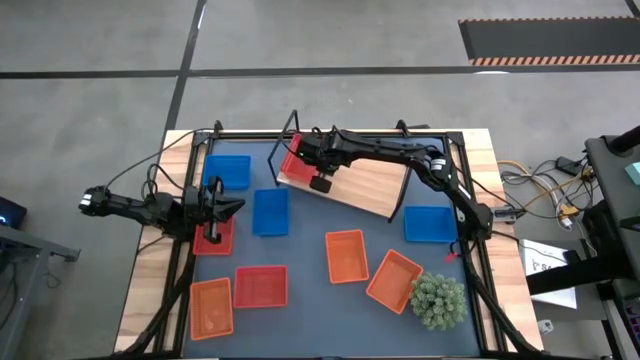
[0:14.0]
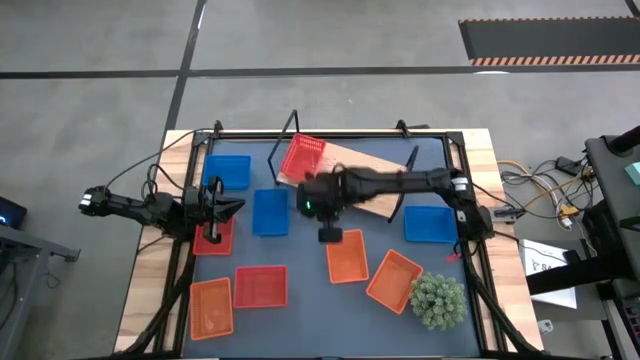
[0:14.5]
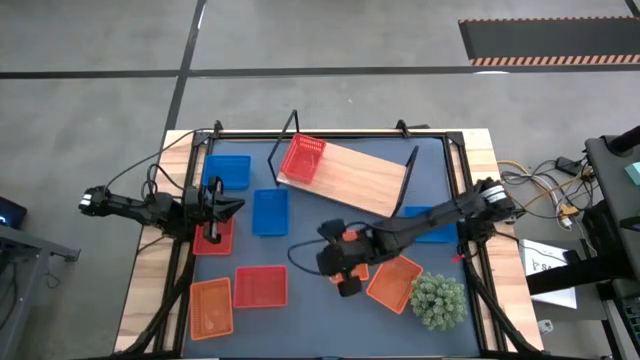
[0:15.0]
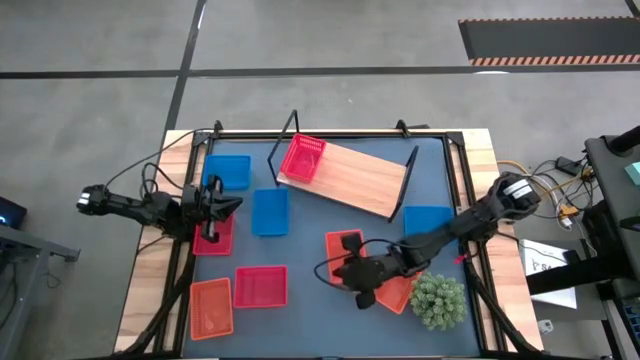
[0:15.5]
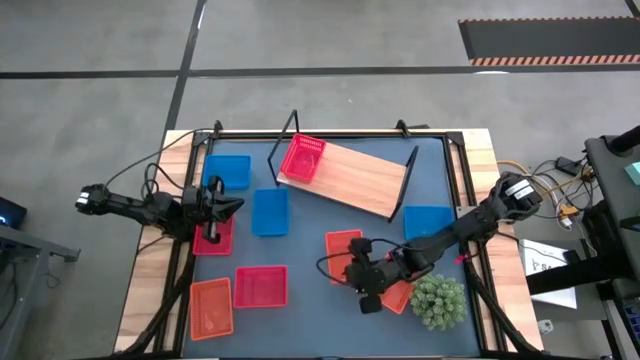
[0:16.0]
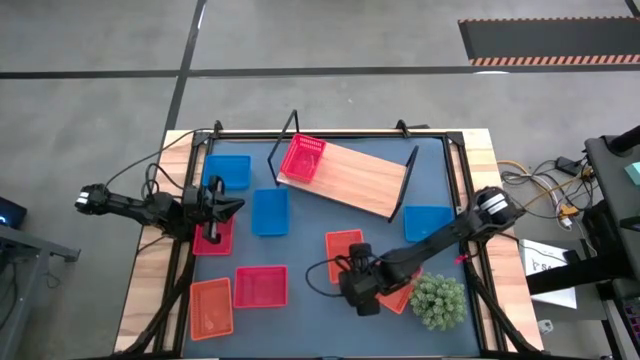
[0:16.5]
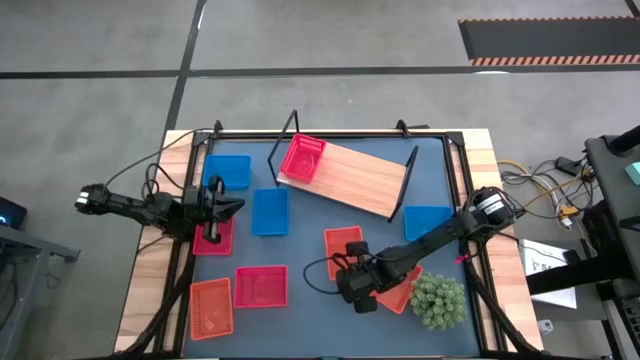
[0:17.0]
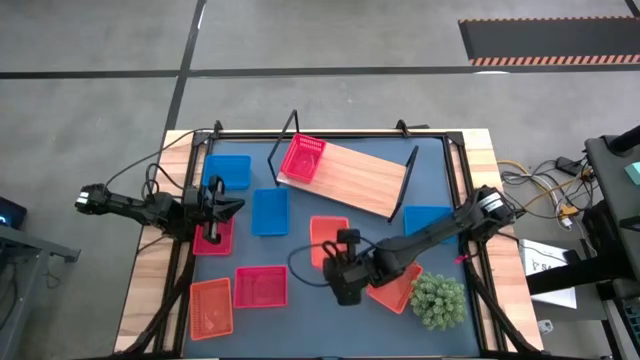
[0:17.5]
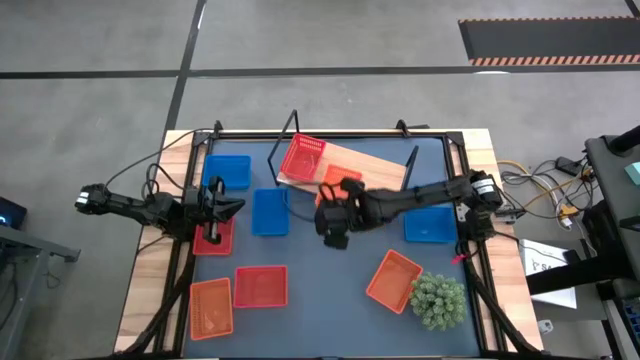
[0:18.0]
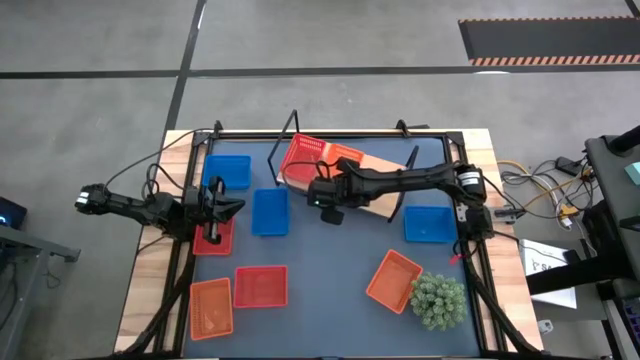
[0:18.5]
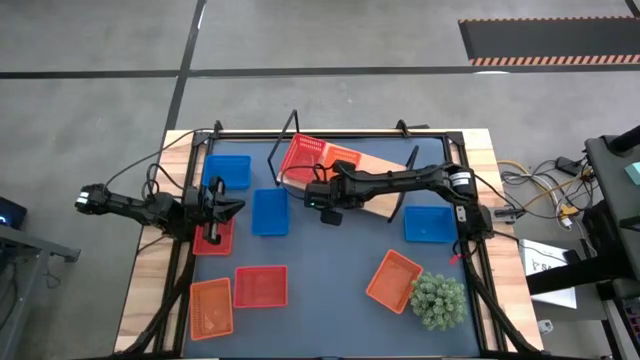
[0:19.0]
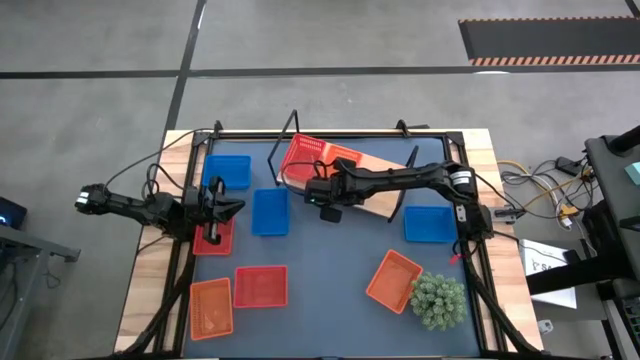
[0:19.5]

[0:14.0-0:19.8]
Task: Stack baskets on shelf by color
Put the middle orange bin on the shelf

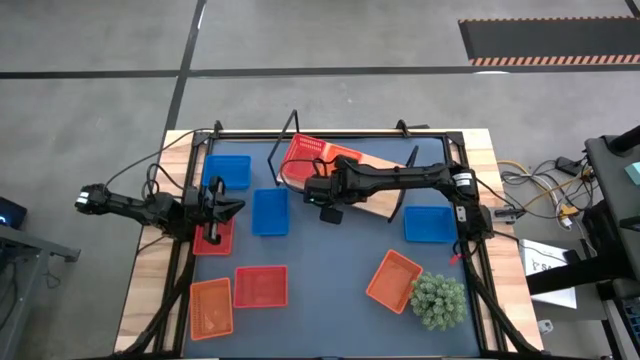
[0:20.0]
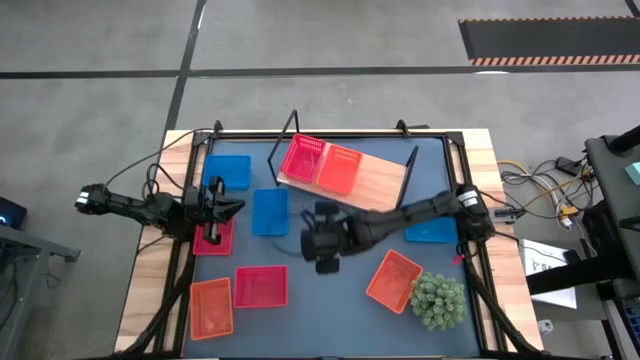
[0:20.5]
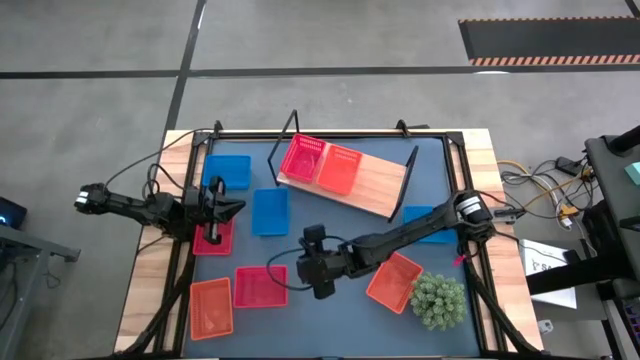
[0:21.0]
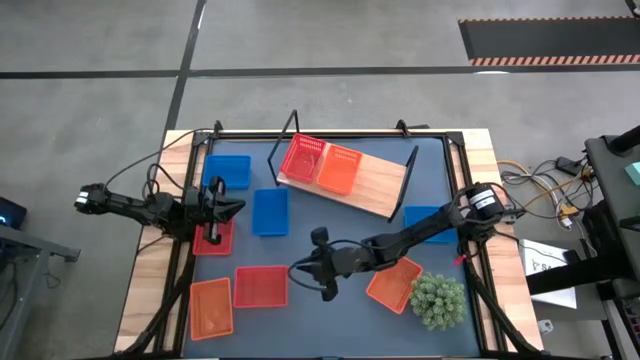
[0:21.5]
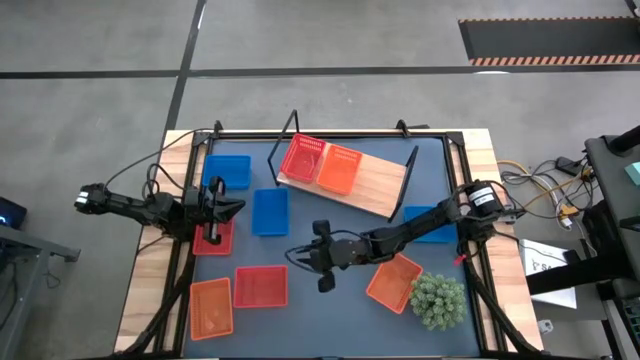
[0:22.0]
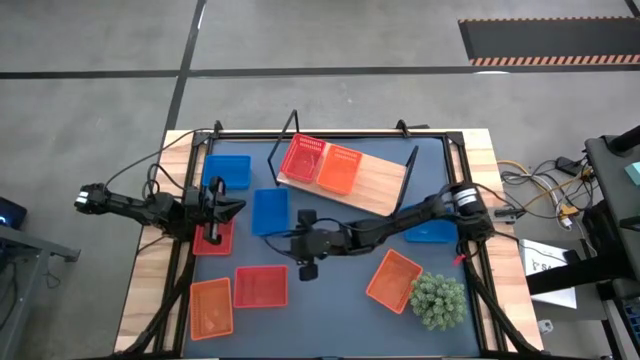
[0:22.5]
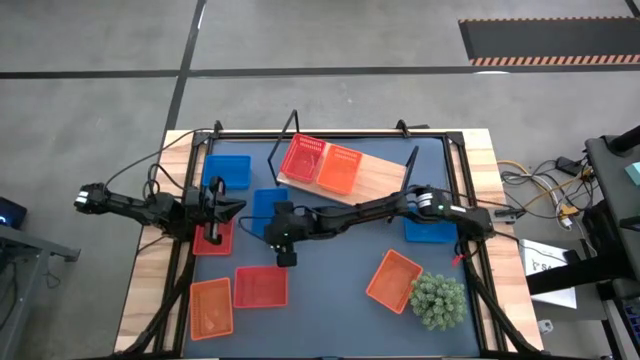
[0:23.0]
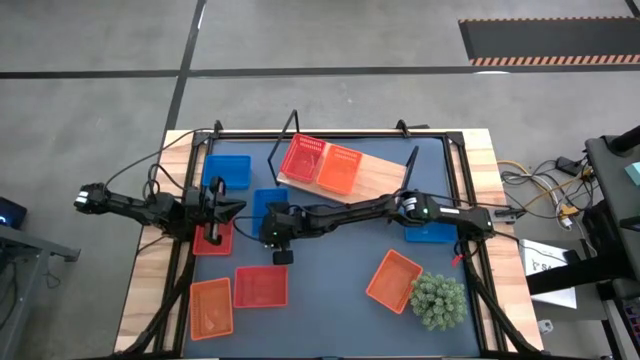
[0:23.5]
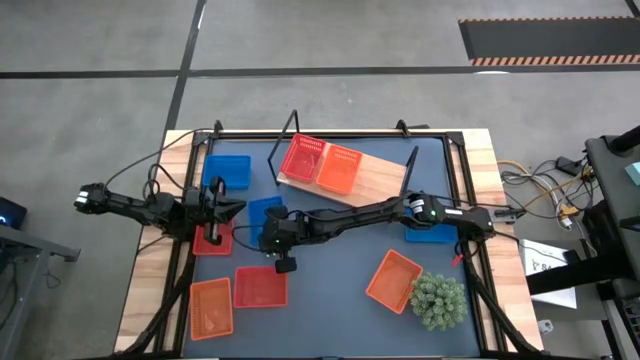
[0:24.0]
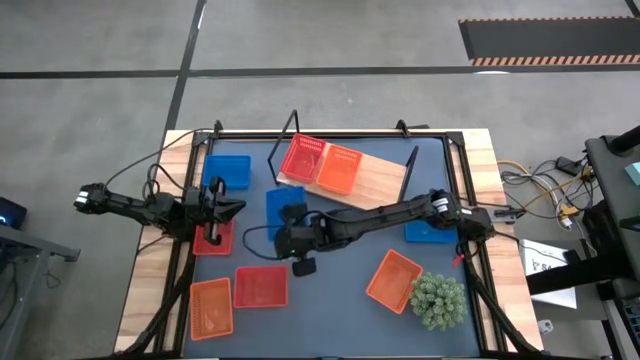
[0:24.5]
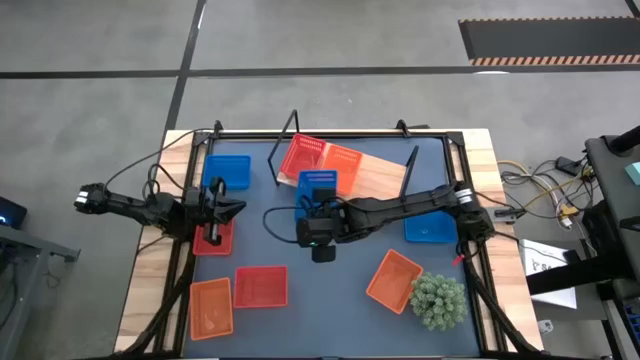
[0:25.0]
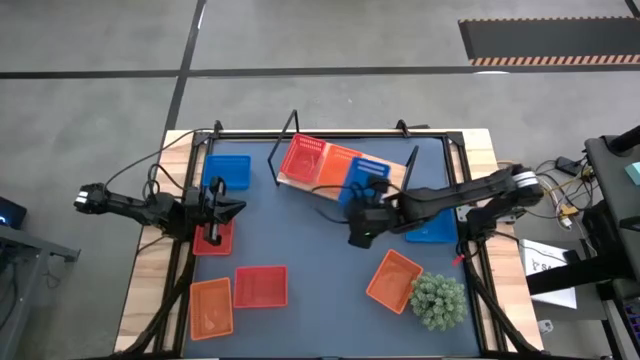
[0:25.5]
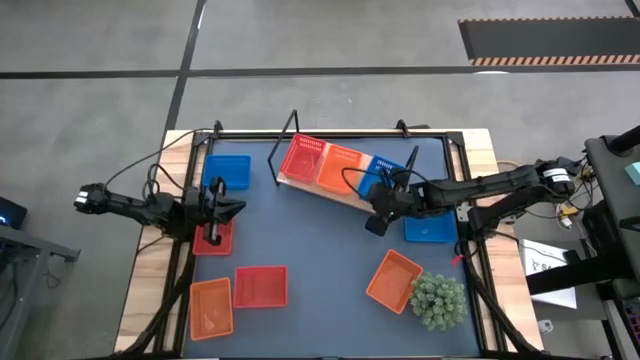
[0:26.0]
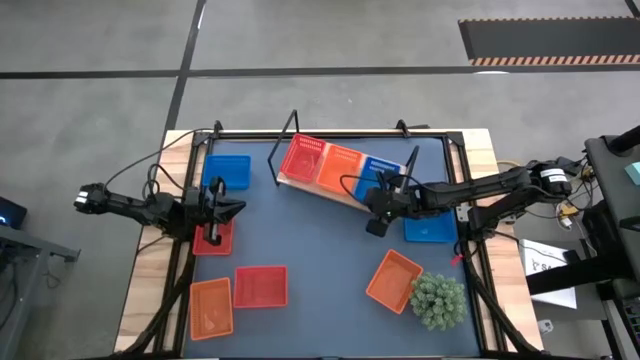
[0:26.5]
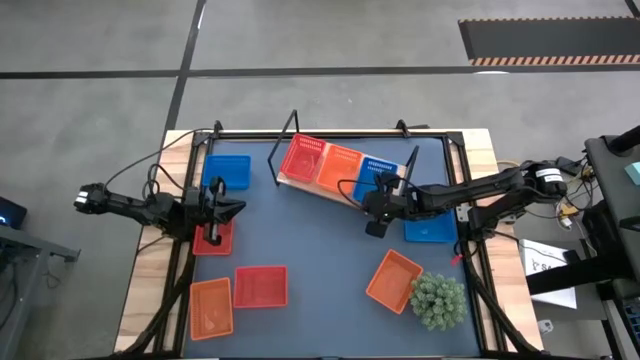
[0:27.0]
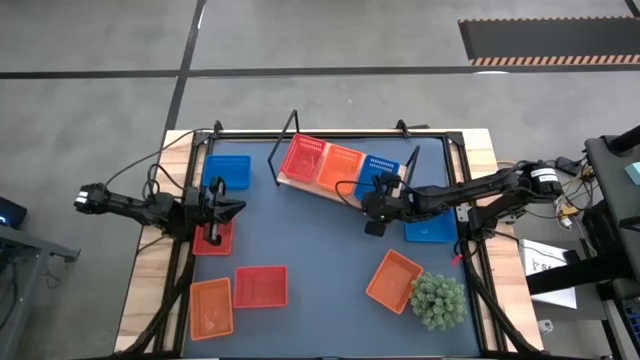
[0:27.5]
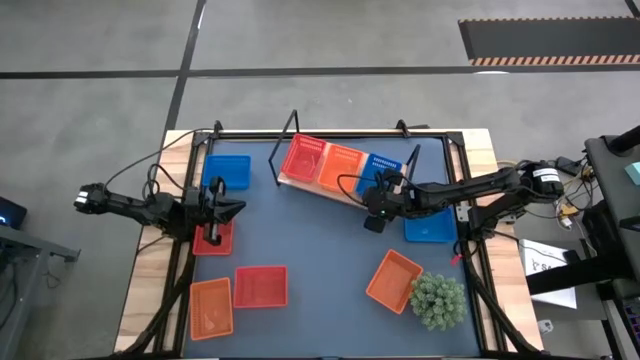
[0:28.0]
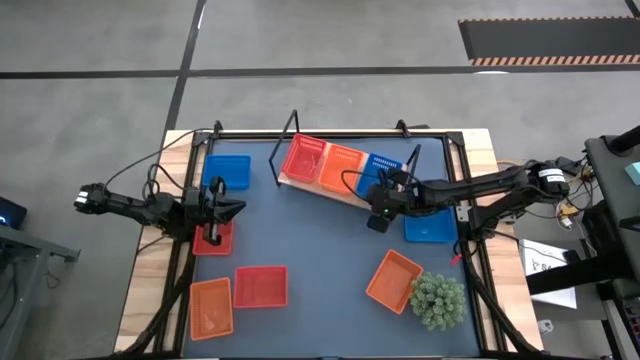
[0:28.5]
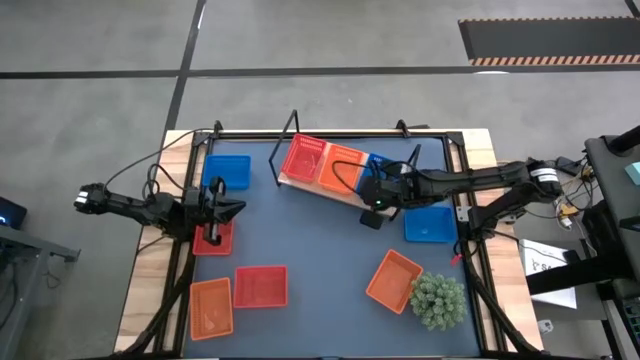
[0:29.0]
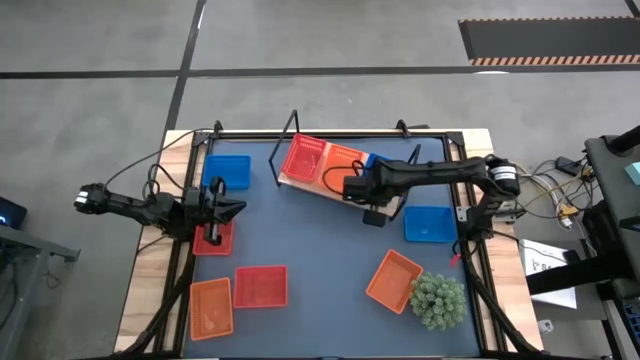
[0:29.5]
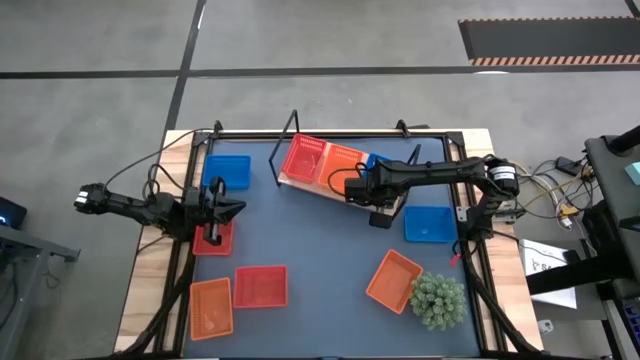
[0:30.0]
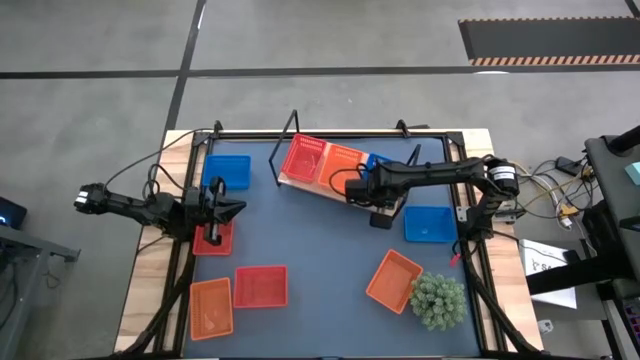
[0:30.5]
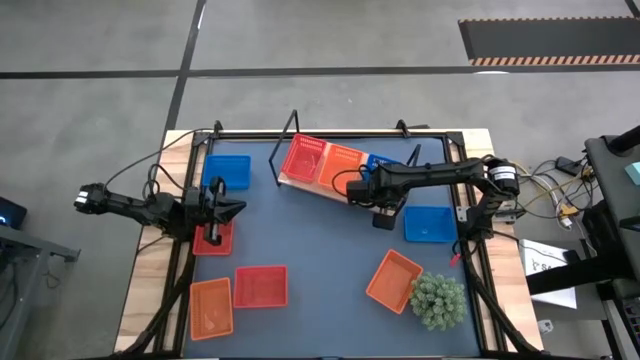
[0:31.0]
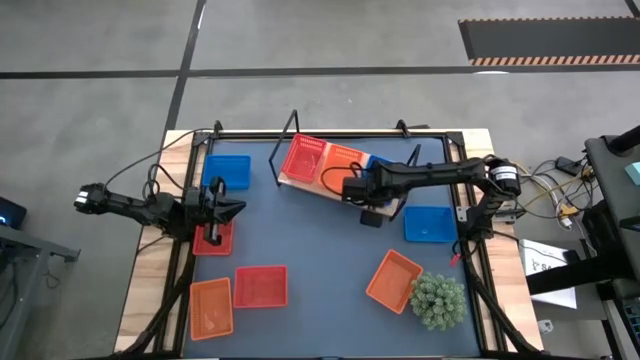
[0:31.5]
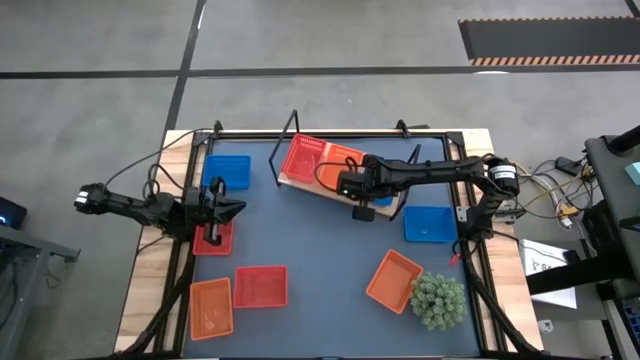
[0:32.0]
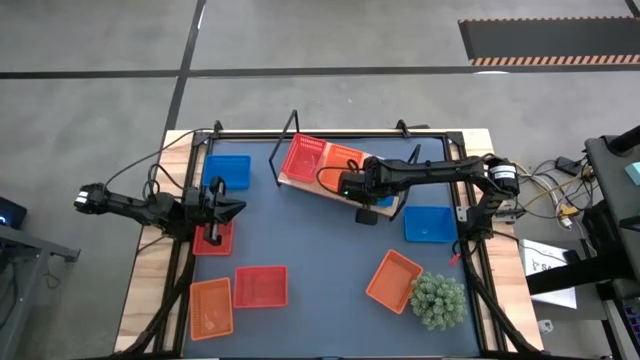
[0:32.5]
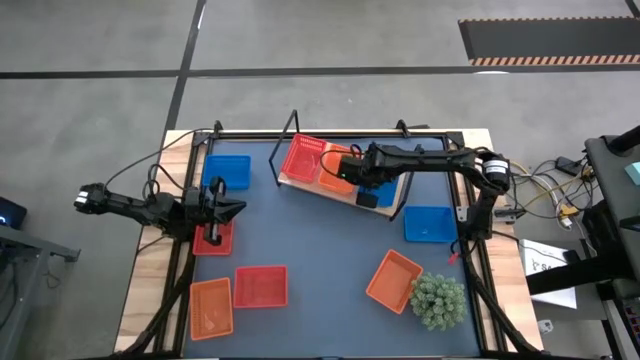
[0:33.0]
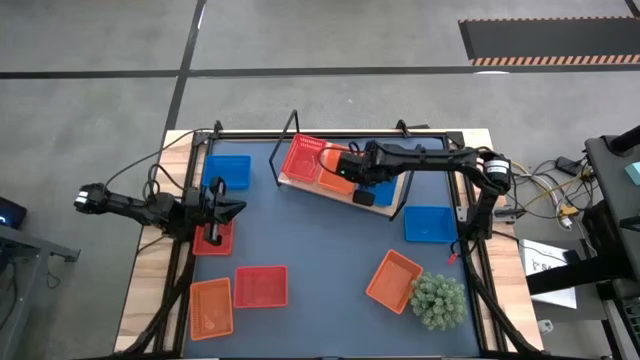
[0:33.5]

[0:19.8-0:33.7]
Put the middle blue bin on the shelf

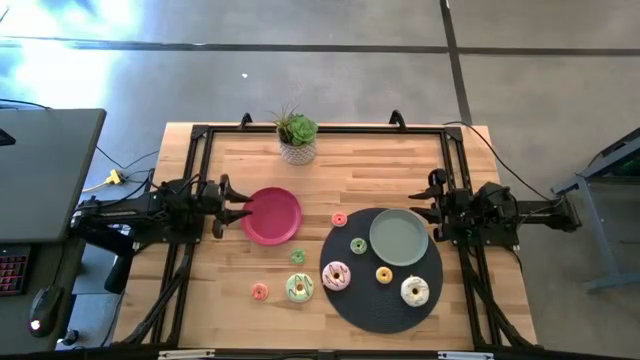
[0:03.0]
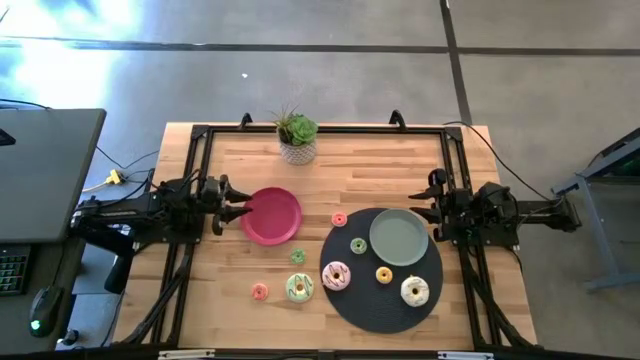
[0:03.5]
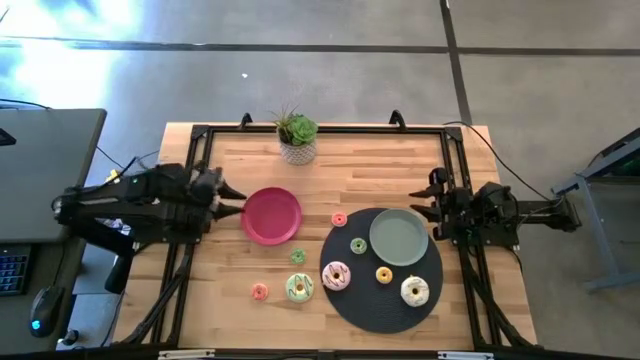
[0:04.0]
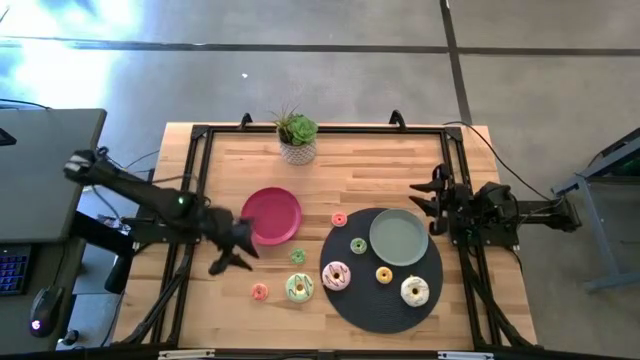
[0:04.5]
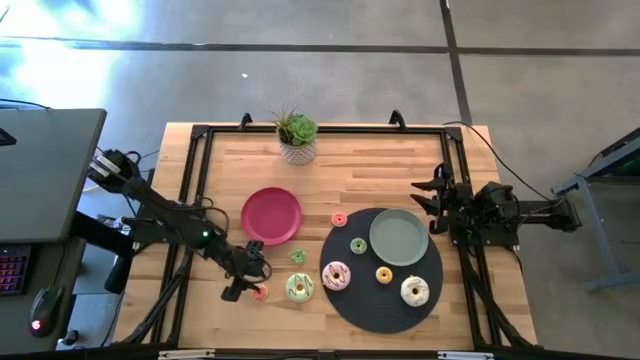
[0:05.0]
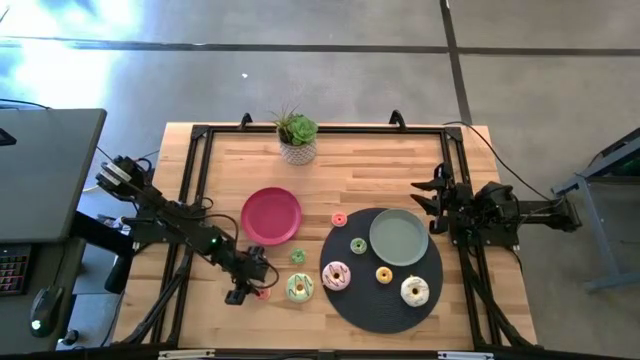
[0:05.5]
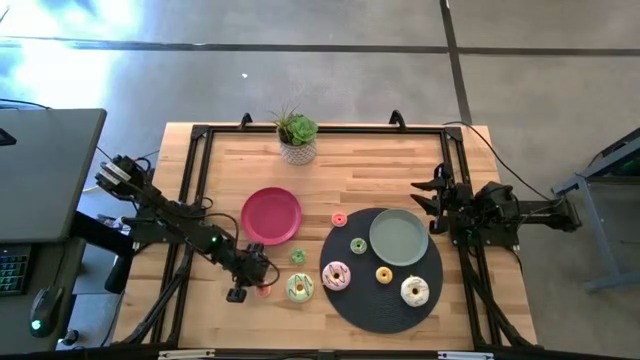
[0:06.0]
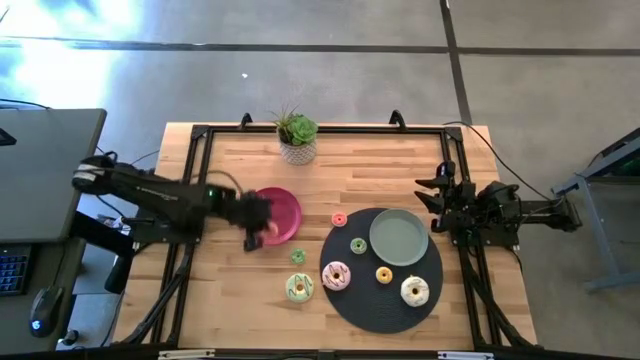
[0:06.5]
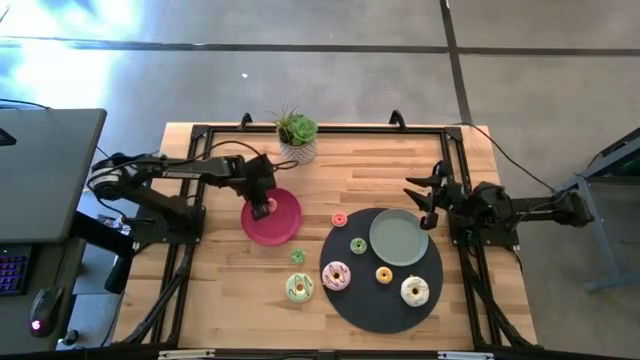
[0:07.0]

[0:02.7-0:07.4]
Task: Pick & Place donuts
Put the bottom small pink donut on the pink plate
